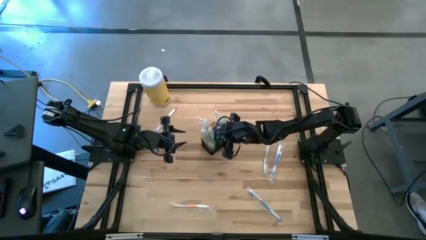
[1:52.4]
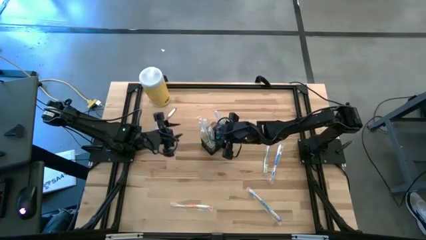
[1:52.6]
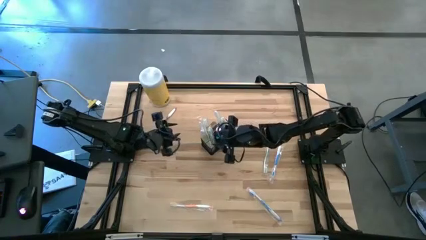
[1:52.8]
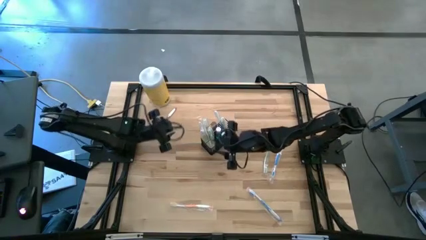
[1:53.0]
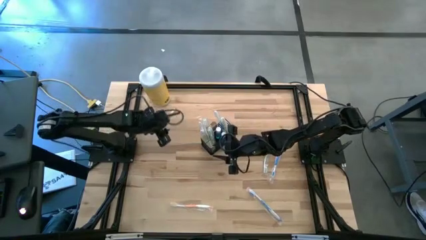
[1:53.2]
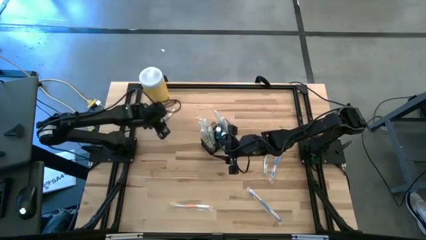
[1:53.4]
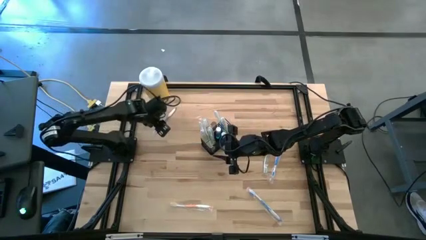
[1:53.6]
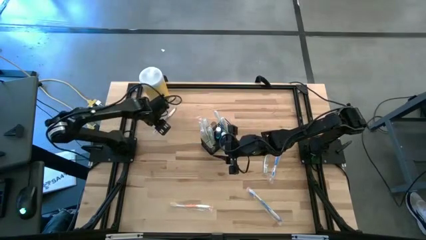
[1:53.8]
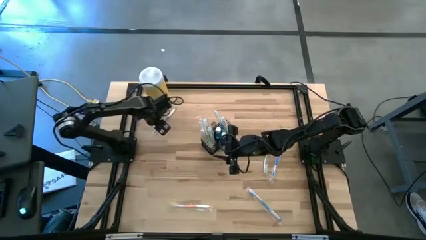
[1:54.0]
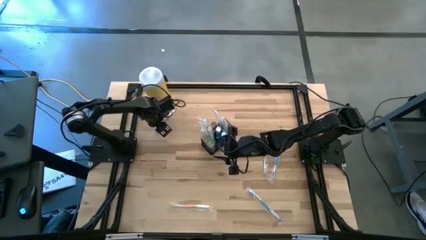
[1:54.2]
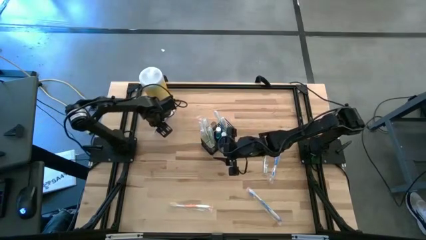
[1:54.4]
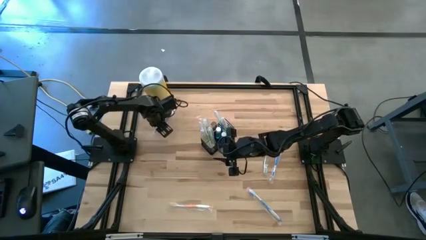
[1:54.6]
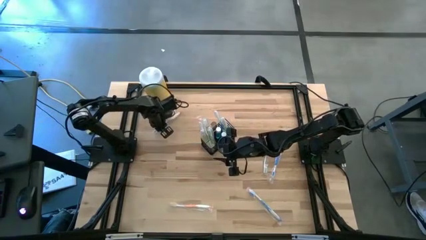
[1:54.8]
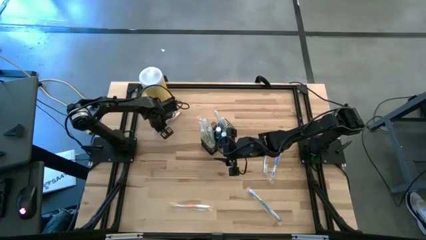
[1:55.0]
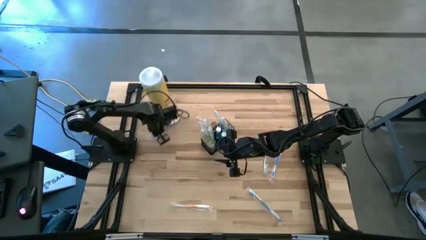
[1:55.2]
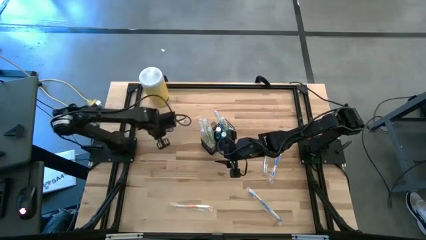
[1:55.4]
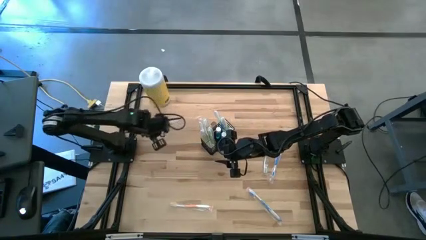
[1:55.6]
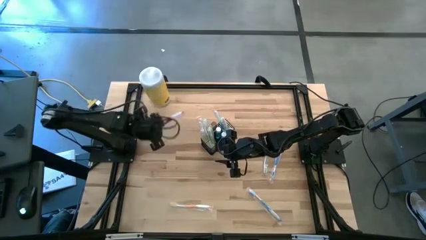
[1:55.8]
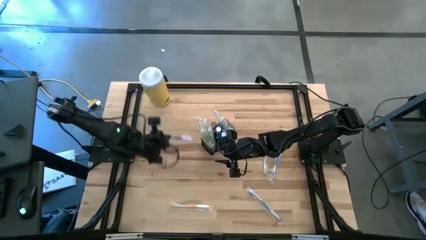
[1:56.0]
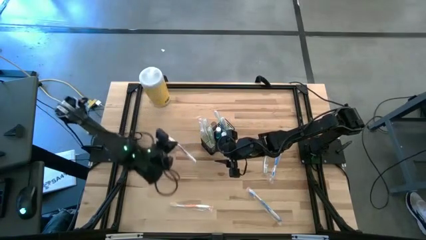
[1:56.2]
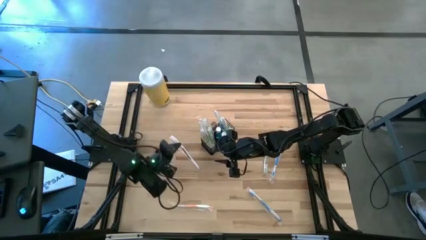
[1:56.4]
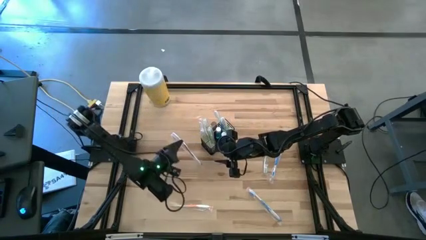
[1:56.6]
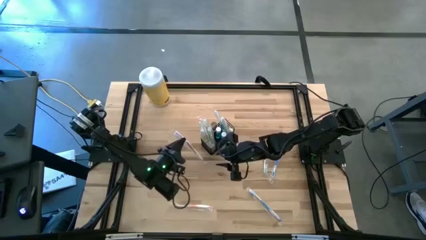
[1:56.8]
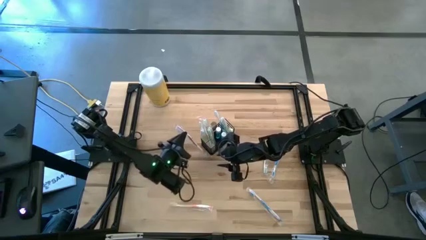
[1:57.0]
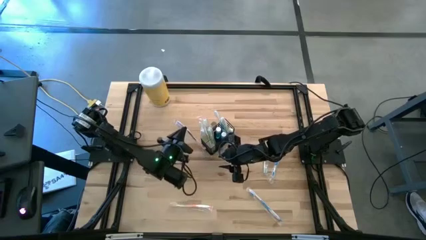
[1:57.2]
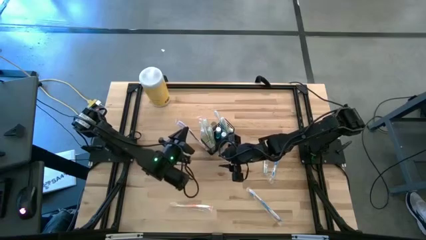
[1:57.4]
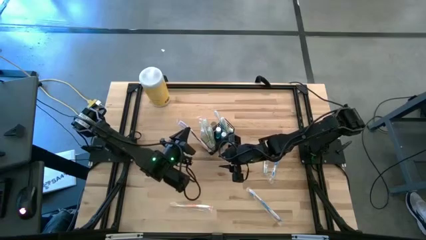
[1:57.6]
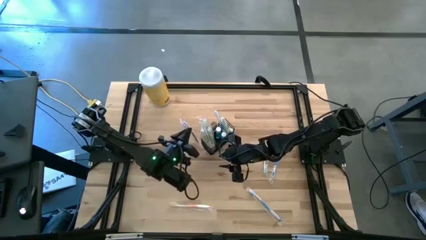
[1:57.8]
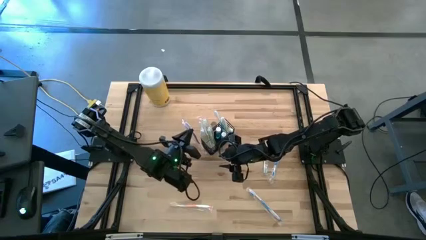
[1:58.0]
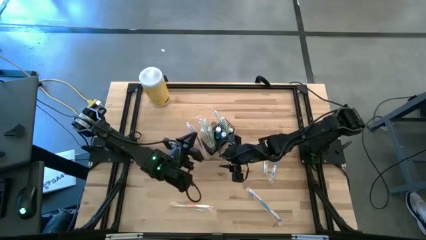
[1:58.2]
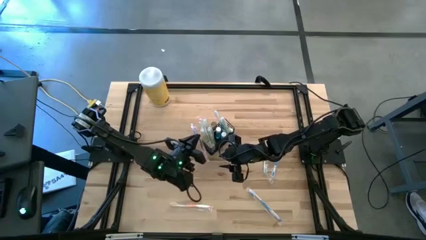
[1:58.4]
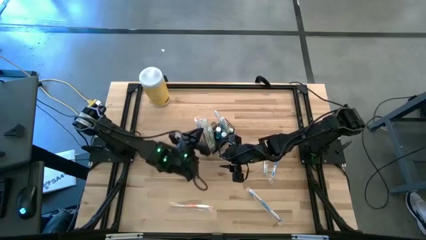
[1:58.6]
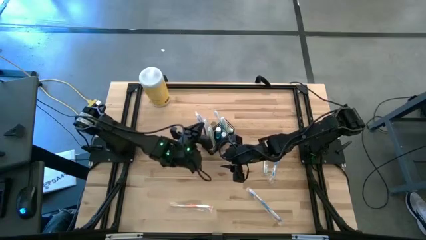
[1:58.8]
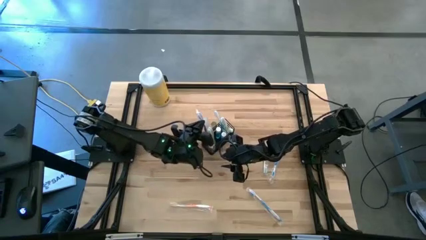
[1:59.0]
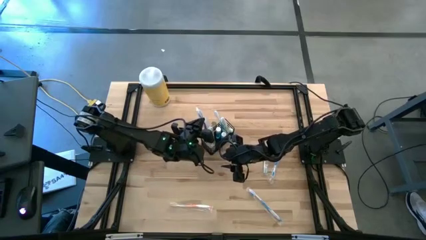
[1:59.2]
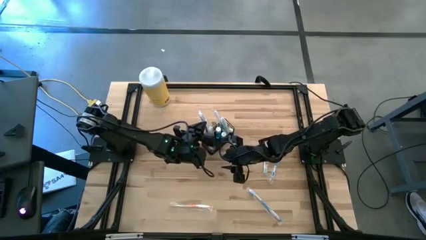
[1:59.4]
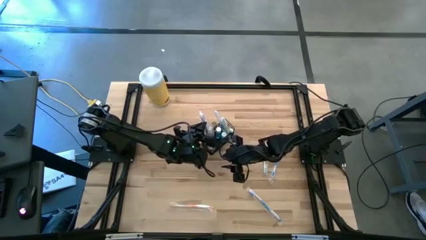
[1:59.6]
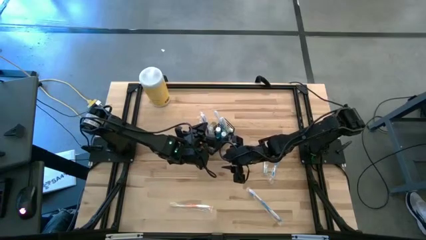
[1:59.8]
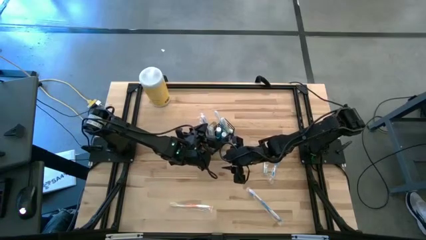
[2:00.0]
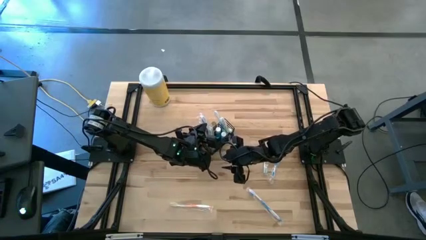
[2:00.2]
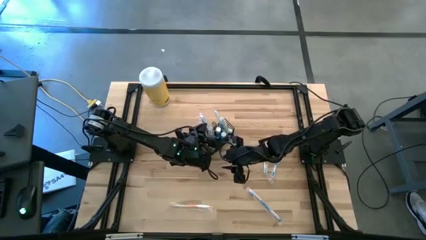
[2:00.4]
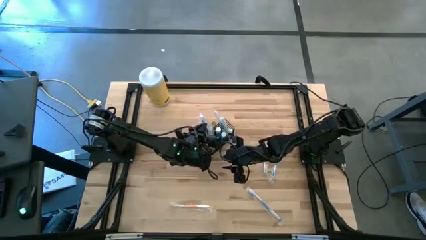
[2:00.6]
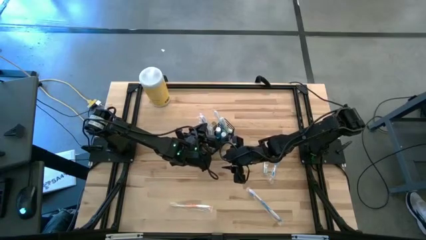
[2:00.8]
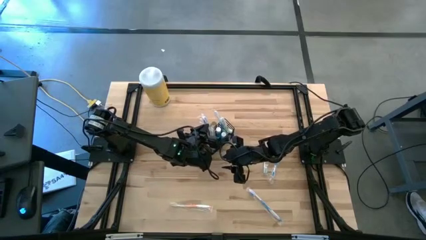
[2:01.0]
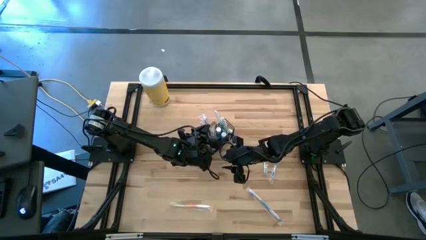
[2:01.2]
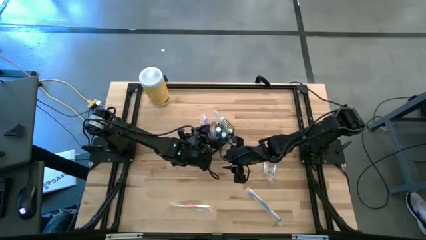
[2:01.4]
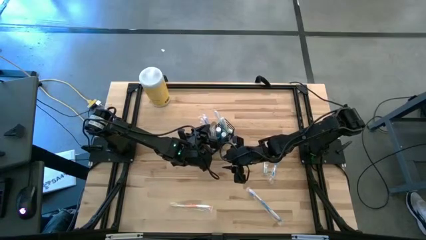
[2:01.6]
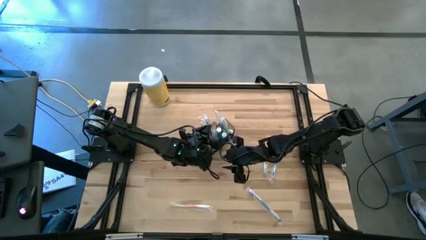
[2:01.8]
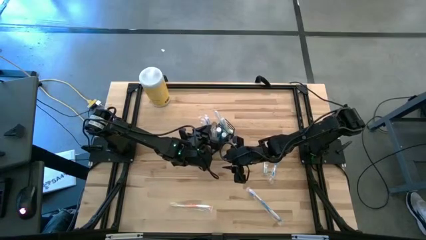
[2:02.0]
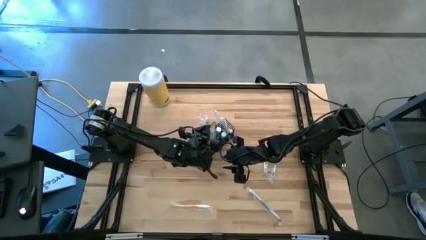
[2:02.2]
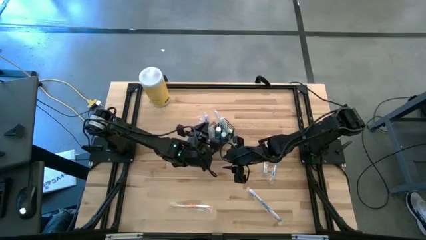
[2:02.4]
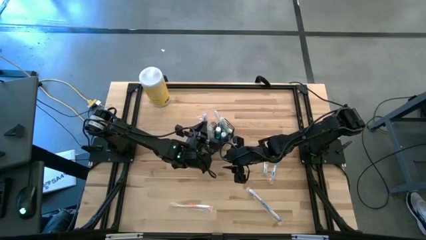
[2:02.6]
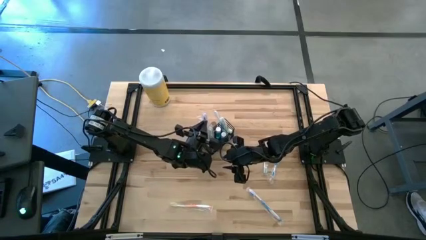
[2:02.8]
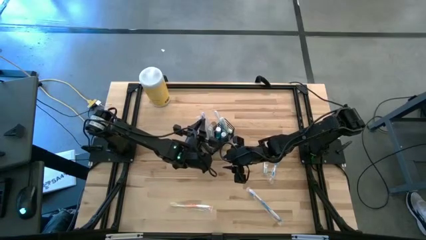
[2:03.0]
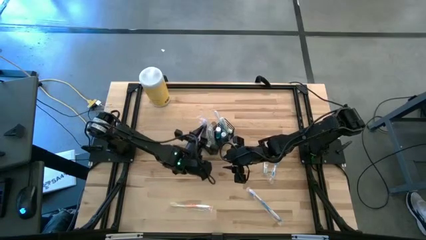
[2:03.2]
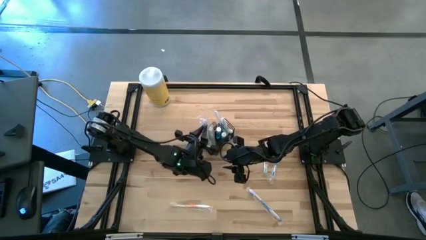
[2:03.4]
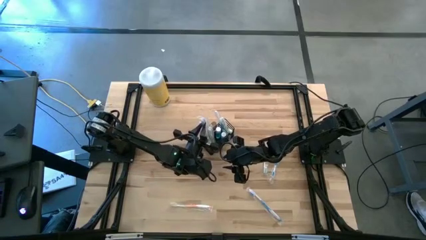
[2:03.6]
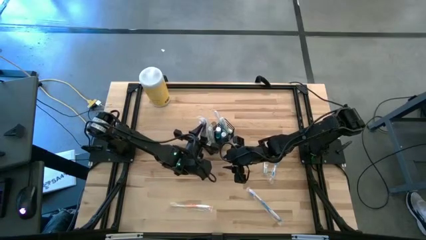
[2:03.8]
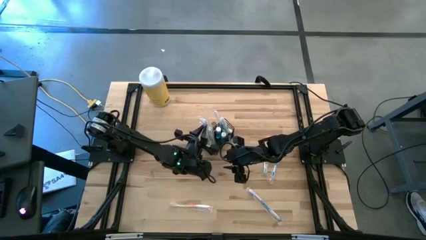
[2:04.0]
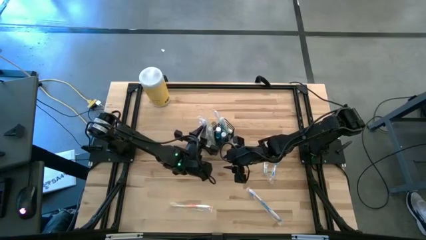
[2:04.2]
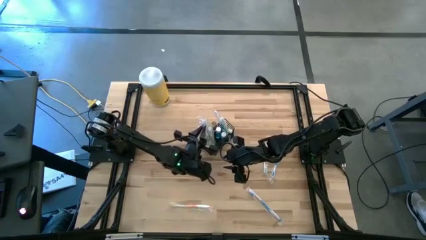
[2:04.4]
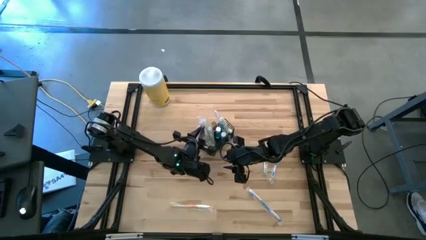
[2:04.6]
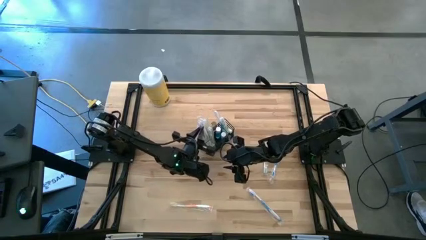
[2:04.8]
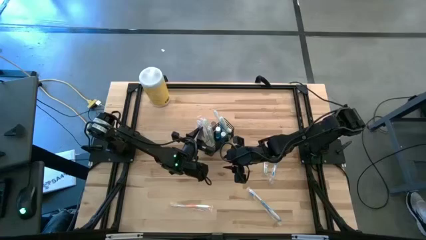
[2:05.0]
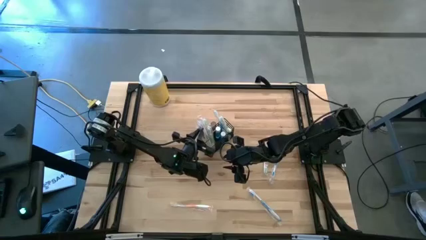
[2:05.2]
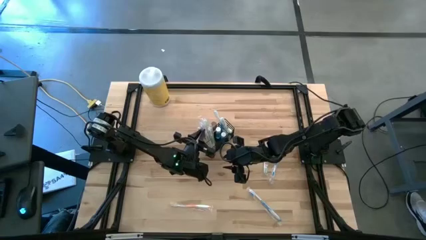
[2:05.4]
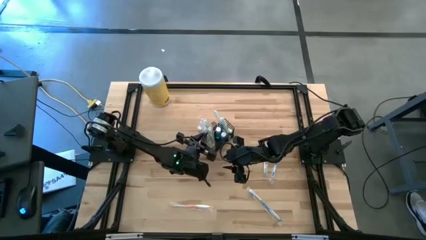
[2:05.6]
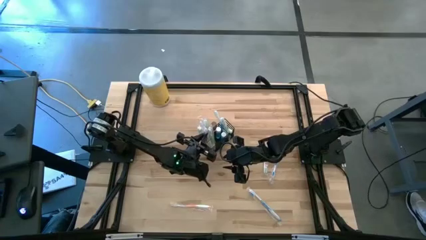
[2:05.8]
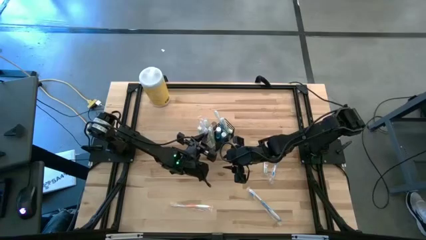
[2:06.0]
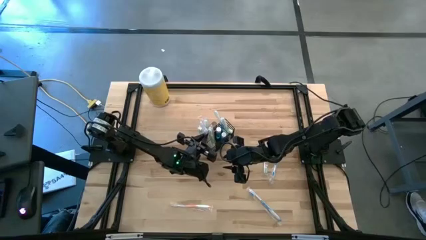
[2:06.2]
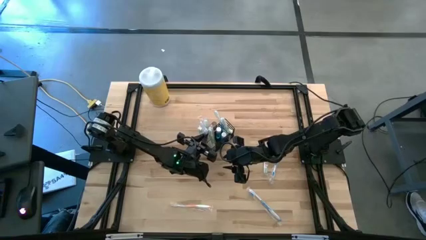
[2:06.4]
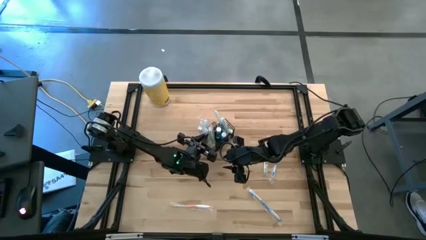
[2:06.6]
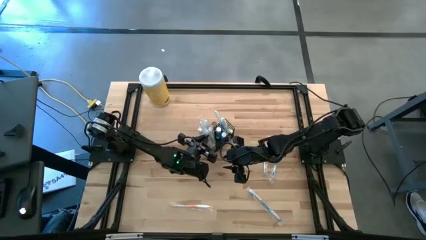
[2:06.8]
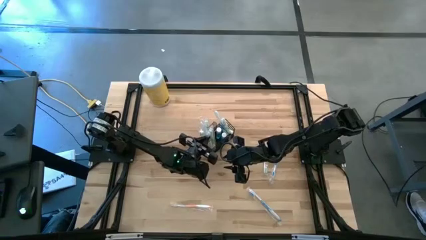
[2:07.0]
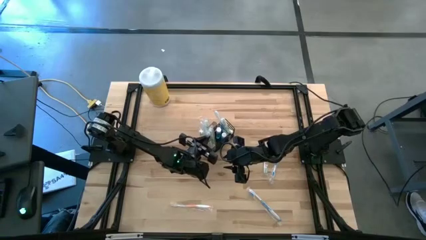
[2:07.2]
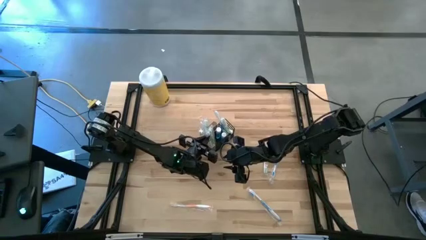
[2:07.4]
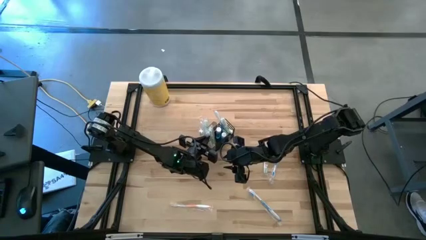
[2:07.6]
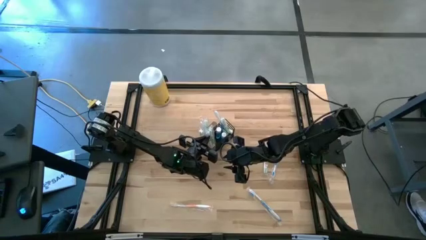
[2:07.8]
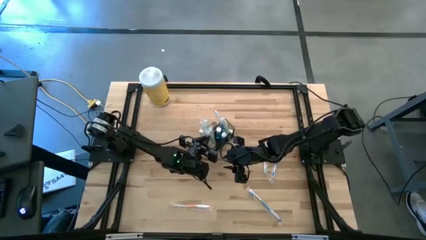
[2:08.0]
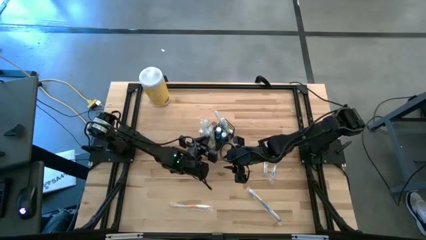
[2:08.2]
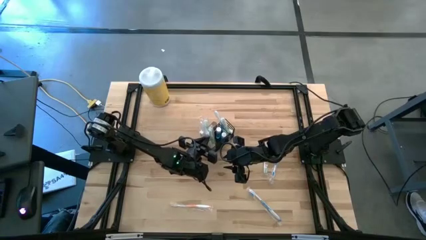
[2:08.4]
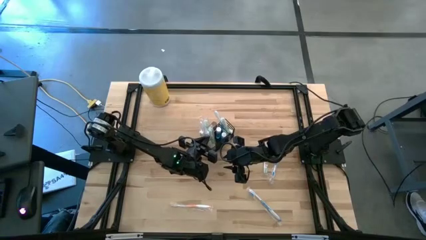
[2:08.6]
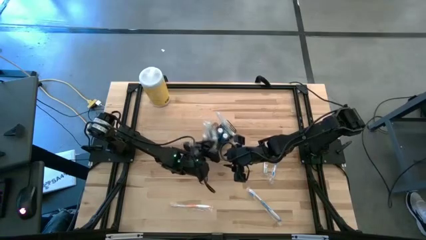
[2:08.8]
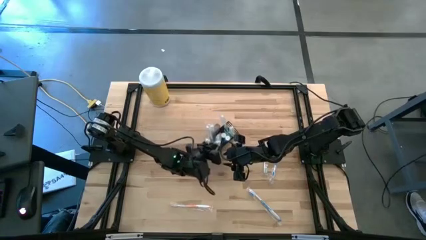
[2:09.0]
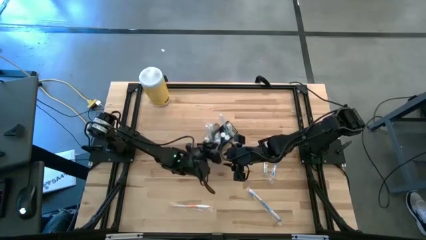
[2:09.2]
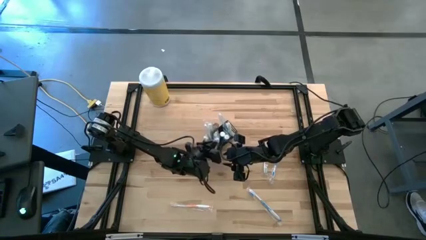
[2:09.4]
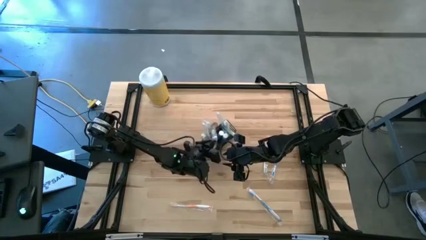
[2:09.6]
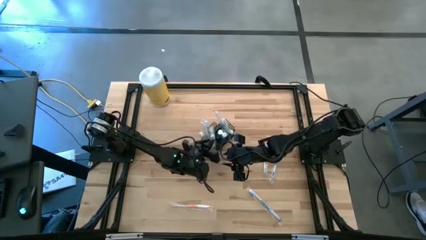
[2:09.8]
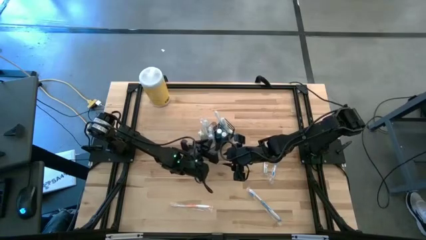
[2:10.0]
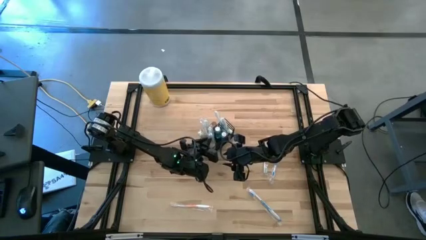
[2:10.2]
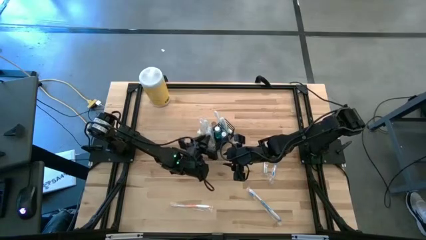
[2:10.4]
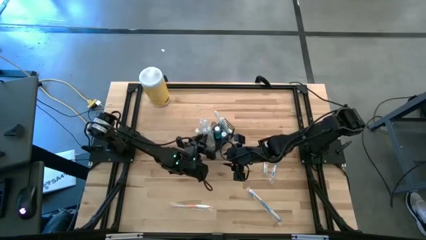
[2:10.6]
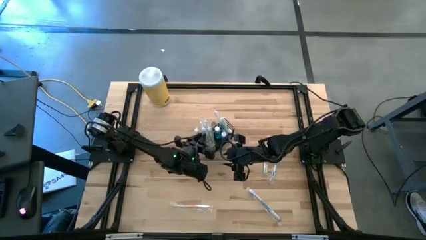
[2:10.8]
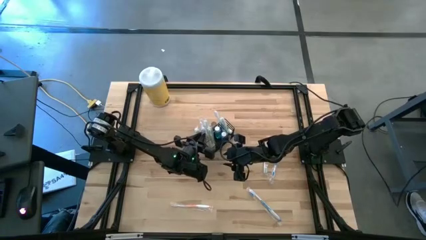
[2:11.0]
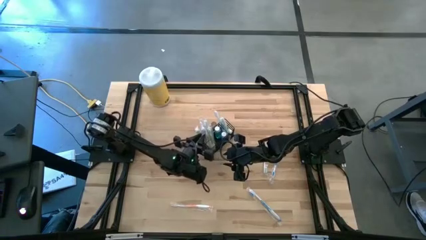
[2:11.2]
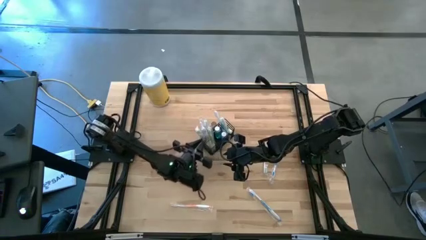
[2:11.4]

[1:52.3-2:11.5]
Task: Pick & Place toothbrushing station
Put the purple toothbrush into the wire organizer
